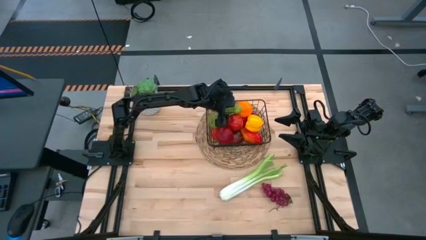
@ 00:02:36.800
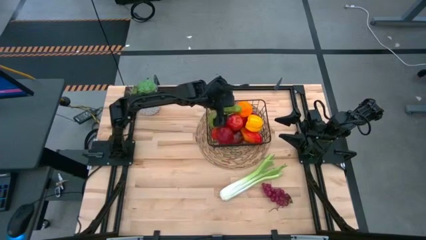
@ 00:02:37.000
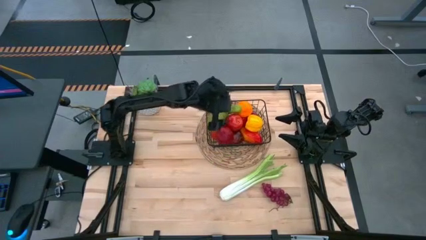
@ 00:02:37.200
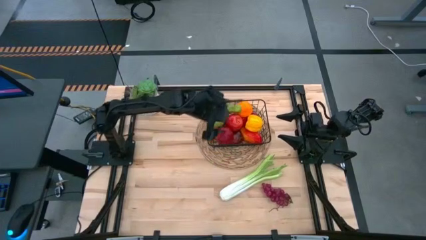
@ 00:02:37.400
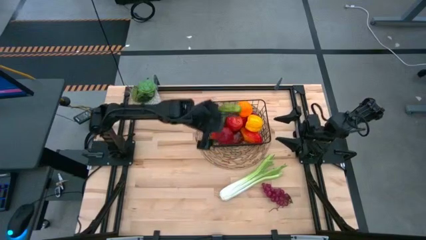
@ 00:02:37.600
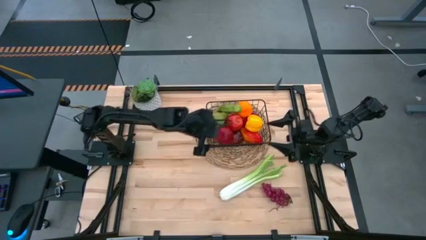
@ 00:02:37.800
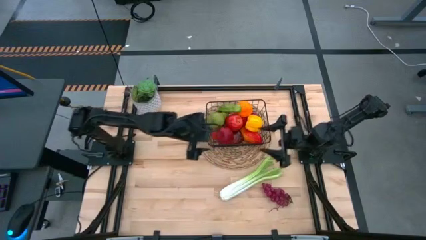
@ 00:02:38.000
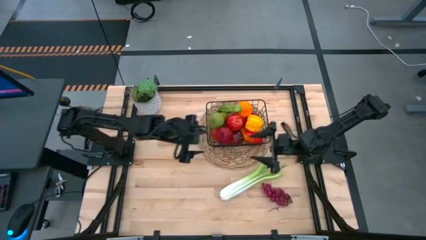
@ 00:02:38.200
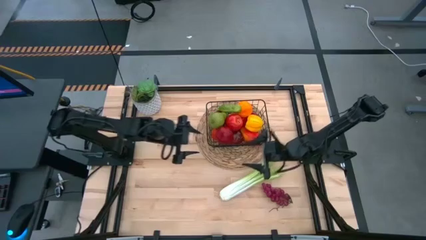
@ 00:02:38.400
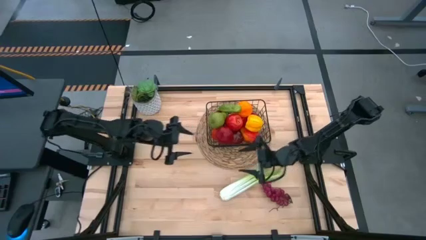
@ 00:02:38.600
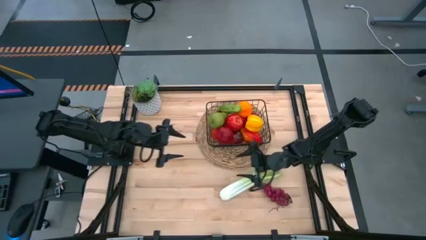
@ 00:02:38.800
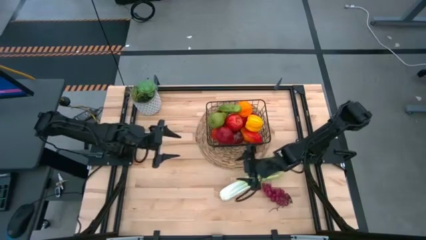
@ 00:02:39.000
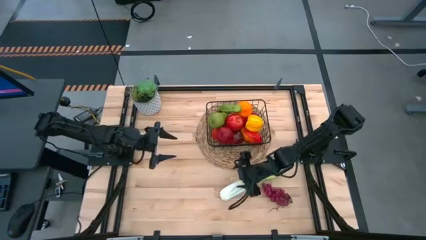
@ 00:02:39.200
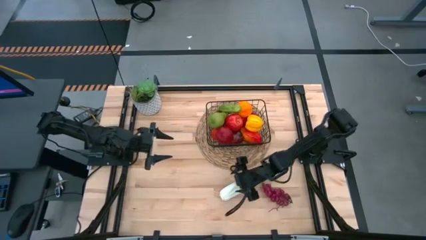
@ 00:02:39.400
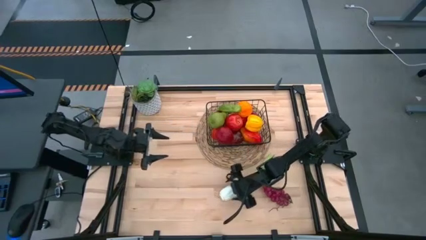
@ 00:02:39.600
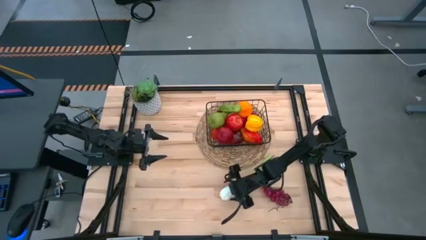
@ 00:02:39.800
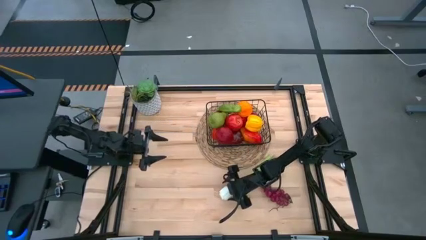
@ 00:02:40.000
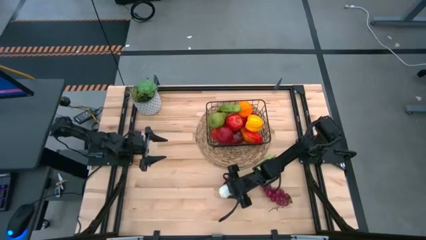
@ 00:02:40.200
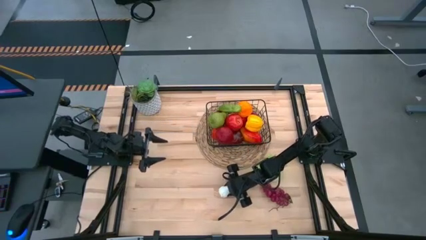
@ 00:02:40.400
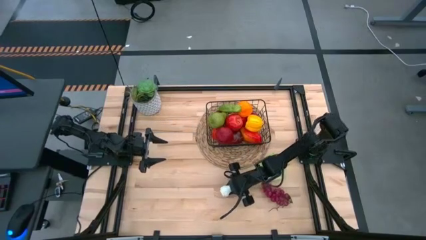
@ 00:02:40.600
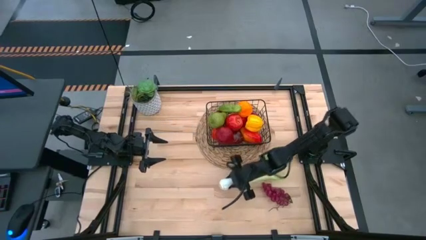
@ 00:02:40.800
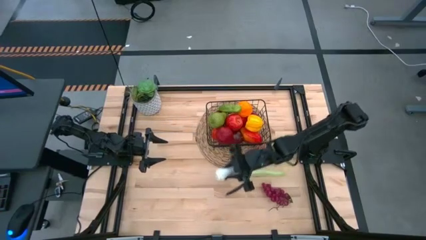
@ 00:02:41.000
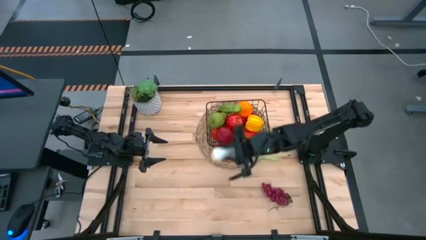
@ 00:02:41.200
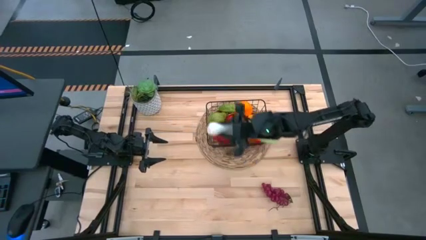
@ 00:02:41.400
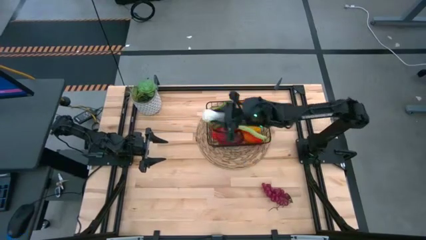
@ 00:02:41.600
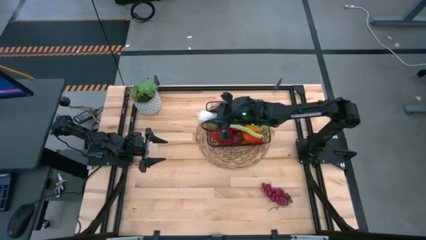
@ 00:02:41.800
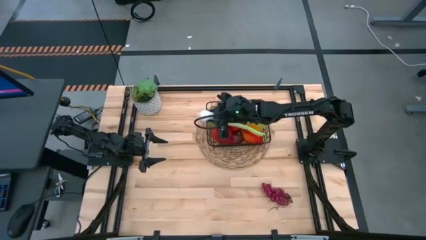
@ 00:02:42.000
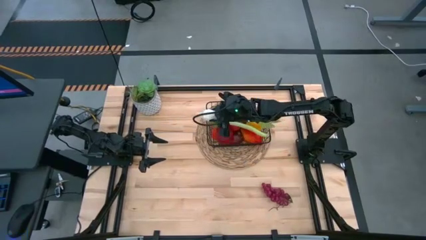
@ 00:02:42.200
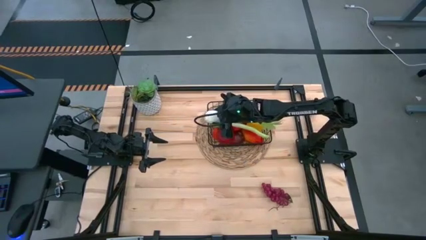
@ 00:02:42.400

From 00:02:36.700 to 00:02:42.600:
Task: Build produce basket
Put the green celery into the black wire basket

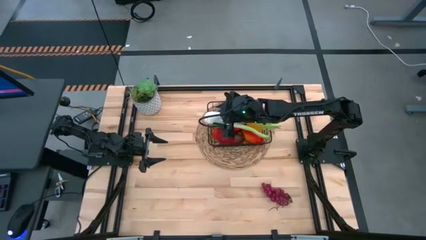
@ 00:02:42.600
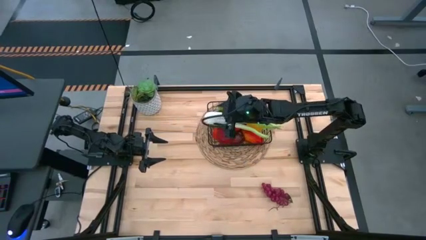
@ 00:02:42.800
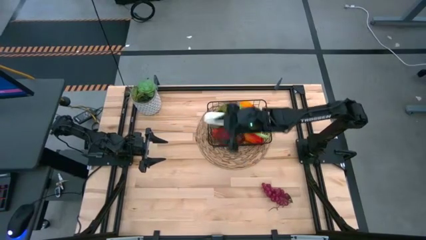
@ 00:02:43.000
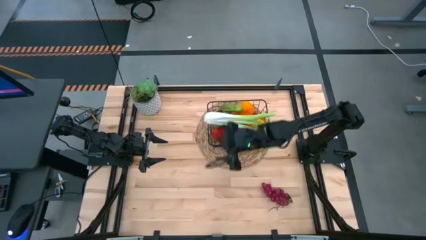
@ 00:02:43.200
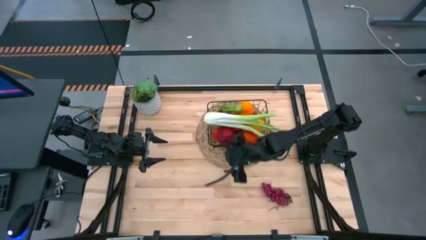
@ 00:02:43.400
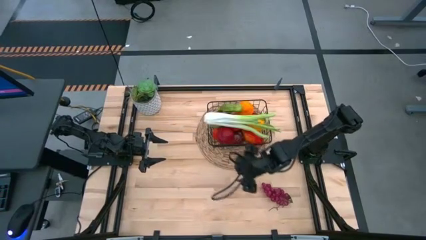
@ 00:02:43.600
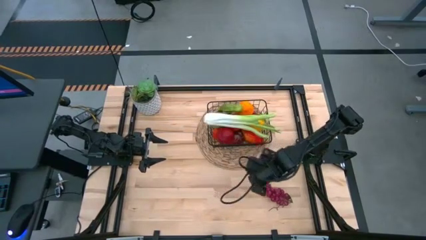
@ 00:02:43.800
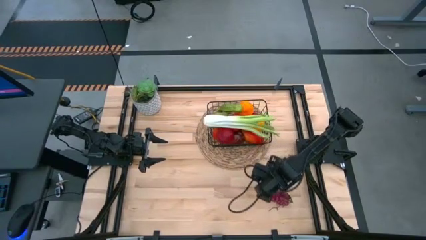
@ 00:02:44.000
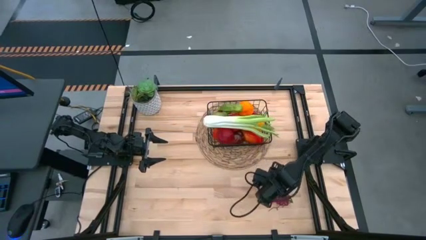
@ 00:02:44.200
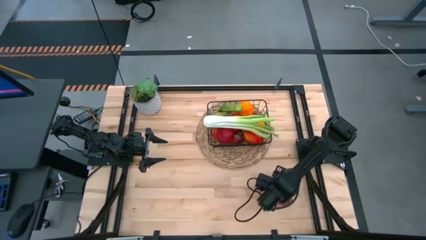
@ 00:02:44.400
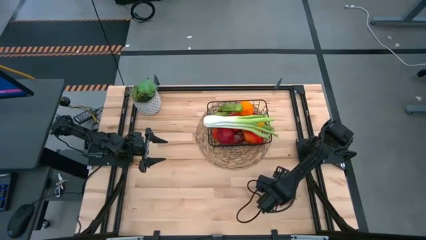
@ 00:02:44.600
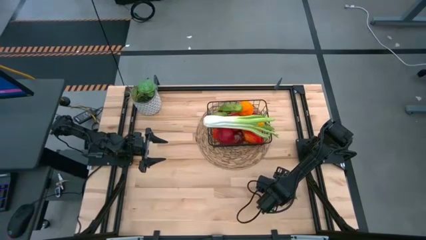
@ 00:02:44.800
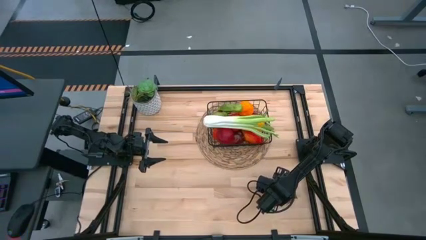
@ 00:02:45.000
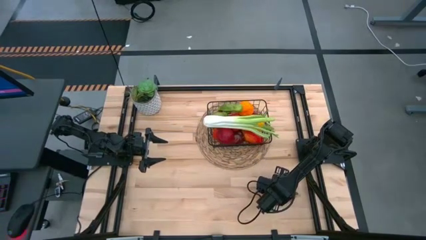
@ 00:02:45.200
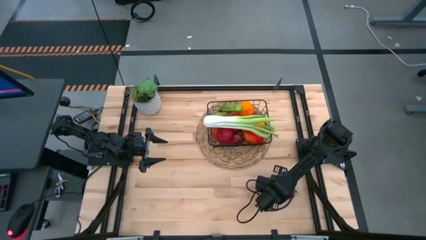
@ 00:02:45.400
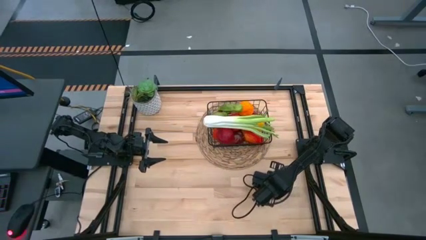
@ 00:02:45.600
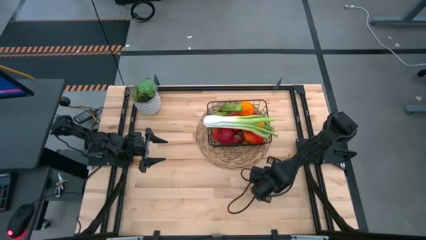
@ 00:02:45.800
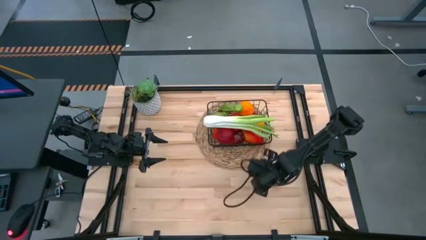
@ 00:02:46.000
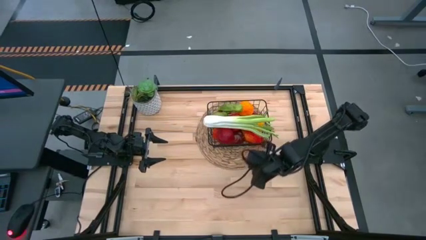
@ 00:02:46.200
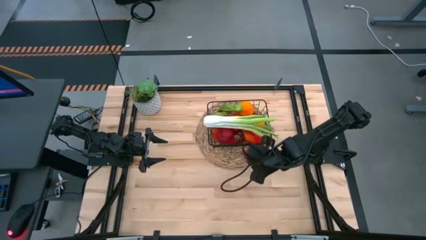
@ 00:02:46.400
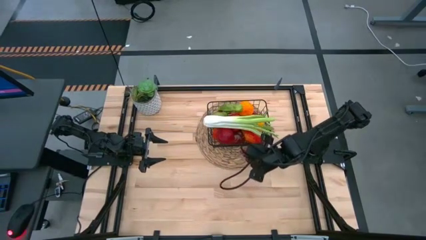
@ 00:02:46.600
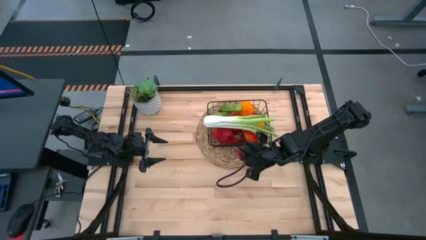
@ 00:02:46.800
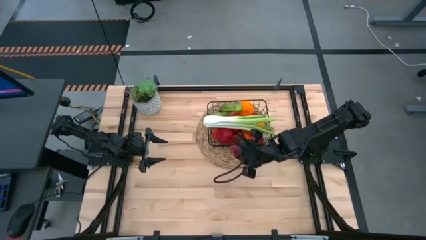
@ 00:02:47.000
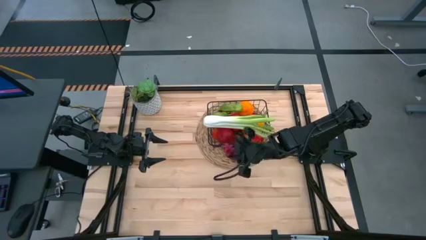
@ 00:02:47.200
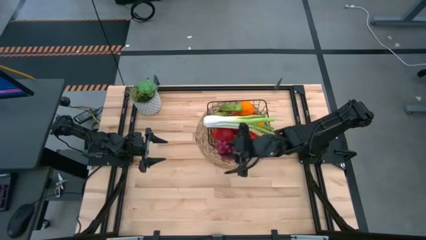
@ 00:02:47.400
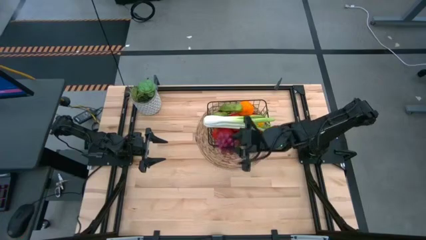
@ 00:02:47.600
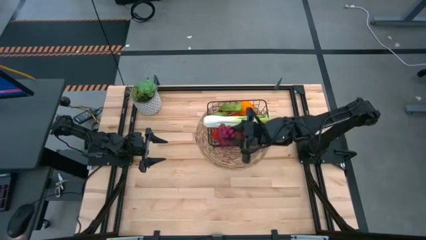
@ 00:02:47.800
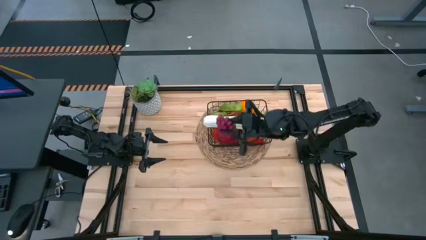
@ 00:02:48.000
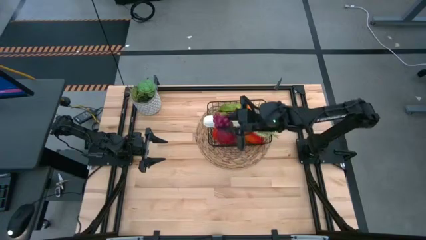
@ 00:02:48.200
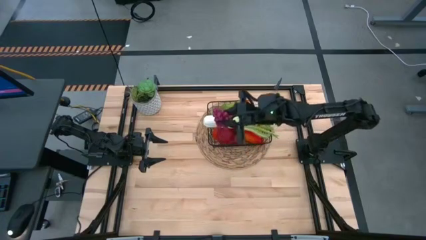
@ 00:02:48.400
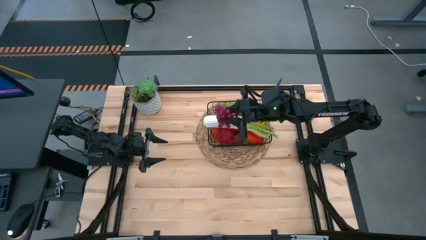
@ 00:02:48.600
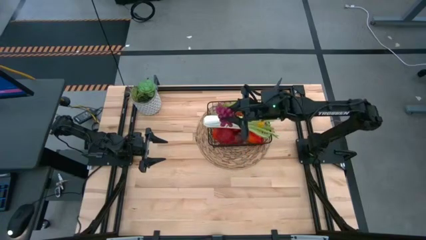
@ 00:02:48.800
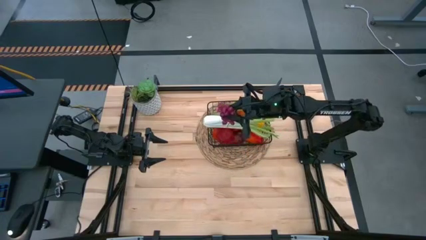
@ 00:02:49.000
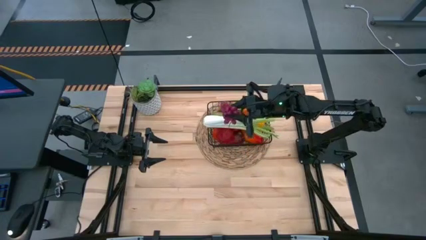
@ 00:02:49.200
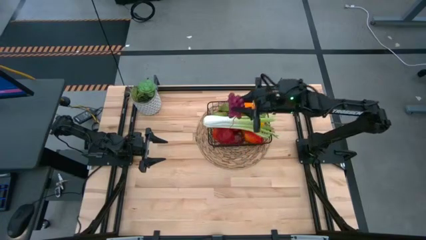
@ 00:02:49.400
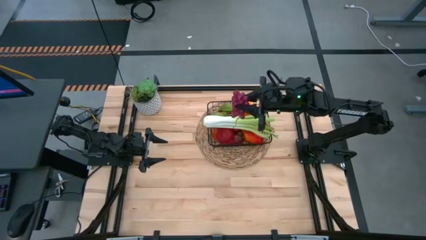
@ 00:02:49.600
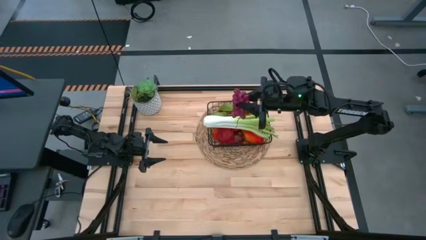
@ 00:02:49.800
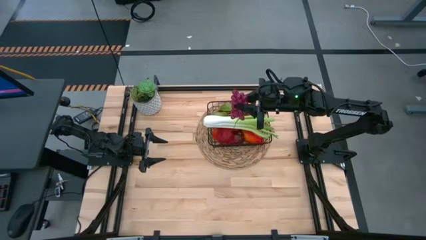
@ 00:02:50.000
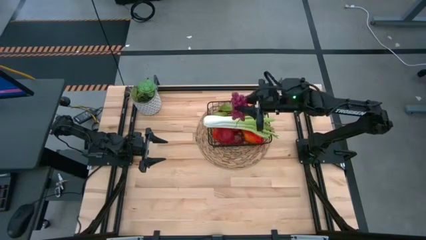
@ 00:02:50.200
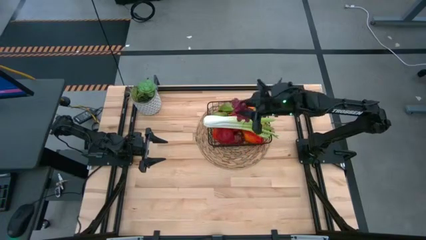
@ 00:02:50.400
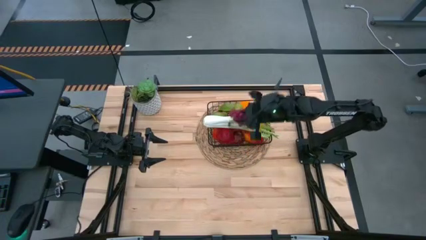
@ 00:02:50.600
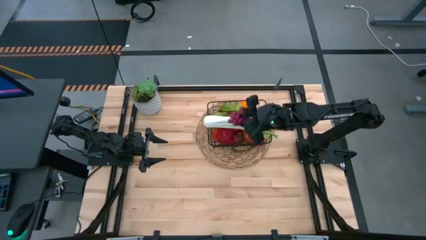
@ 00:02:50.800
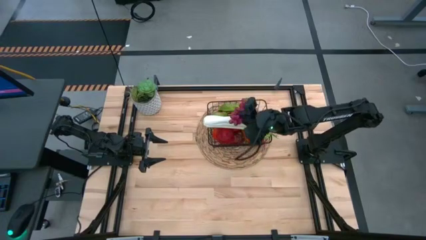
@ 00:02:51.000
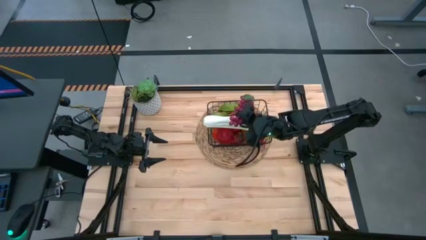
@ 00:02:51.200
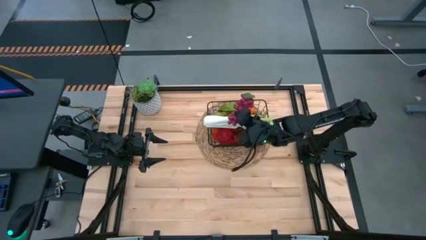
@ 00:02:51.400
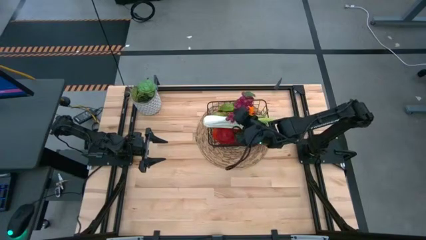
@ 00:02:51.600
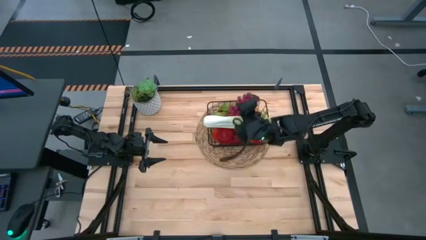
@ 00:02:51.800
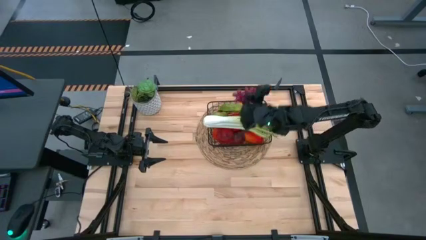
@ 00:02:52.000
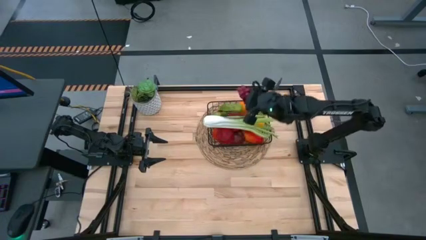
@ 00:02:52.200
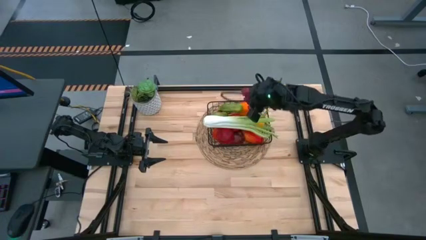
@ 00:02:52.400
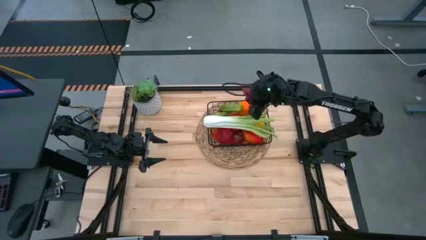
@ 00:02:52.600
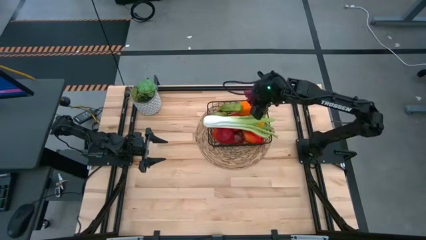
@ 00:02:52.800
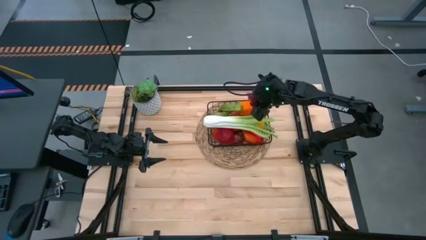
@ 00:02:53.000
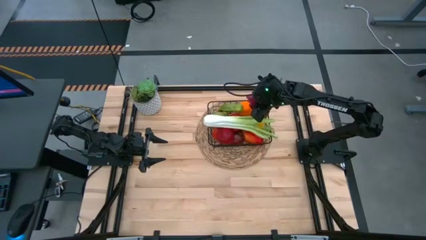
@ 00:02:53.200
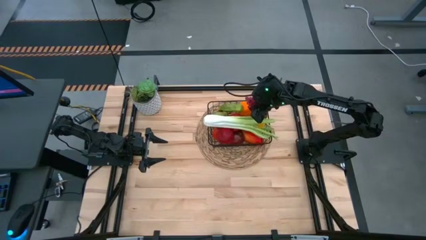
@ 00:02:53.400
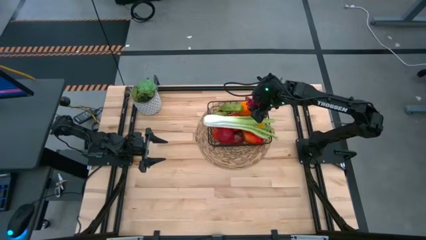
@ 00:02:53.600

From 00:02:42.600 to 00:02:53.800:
Put the red grapes into the black wire basket
